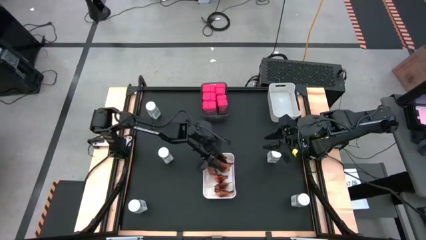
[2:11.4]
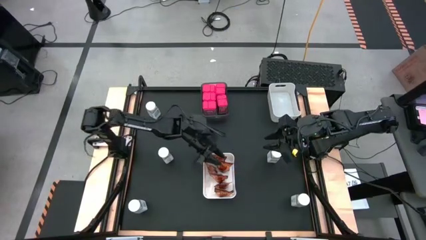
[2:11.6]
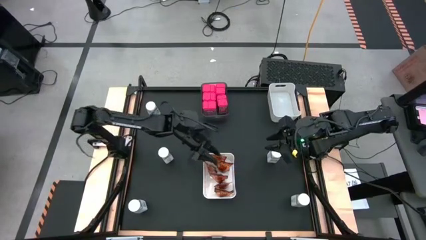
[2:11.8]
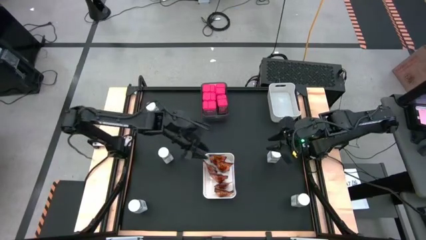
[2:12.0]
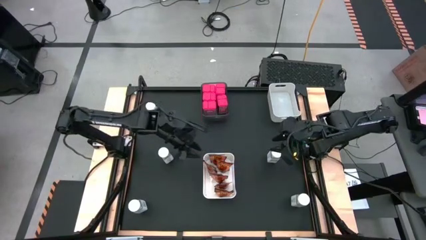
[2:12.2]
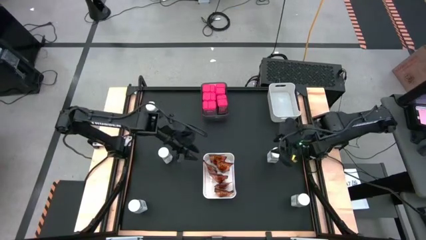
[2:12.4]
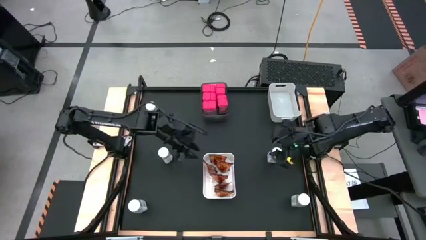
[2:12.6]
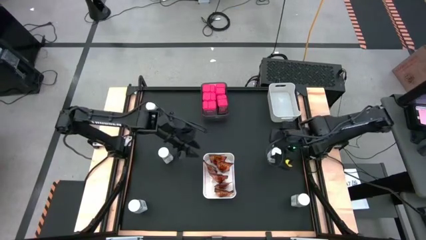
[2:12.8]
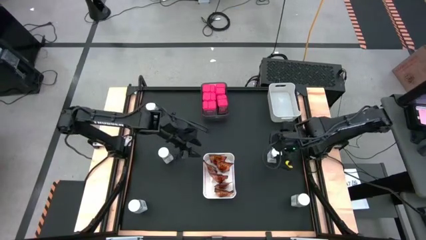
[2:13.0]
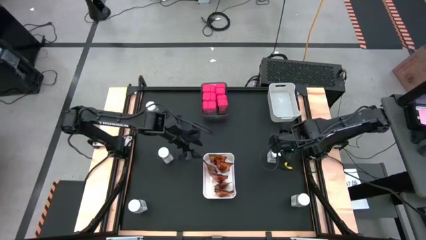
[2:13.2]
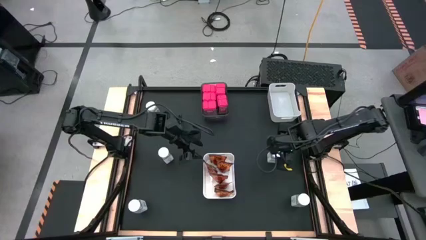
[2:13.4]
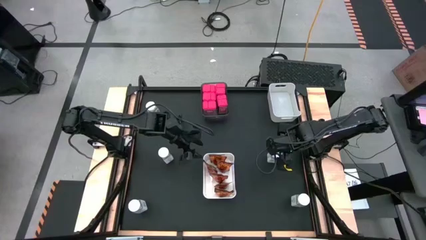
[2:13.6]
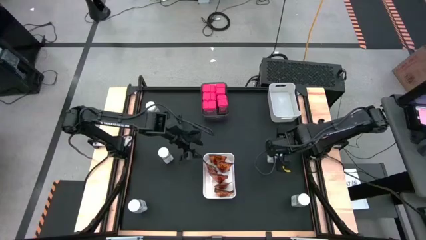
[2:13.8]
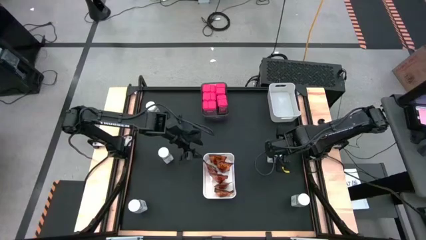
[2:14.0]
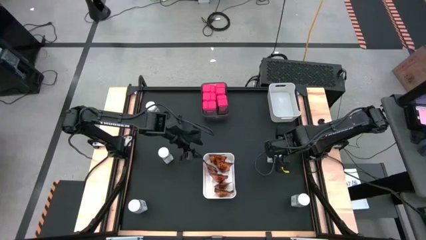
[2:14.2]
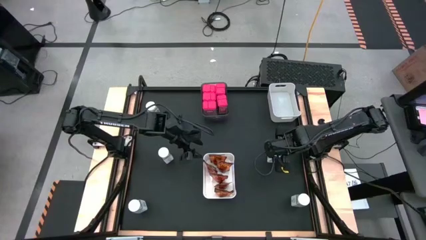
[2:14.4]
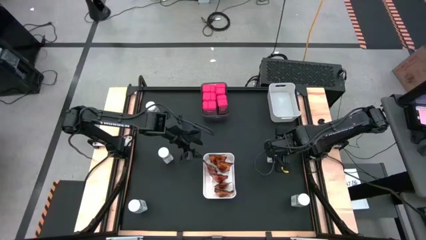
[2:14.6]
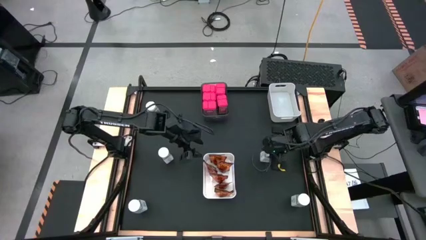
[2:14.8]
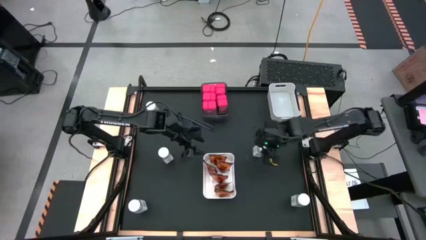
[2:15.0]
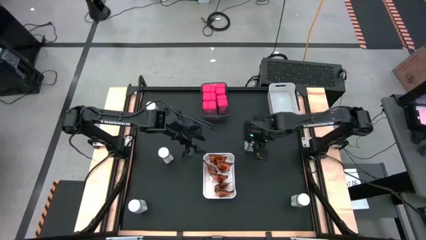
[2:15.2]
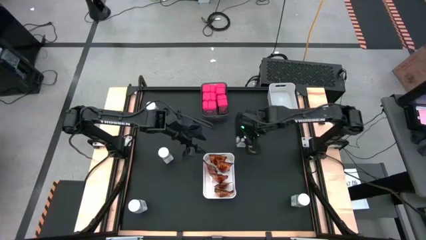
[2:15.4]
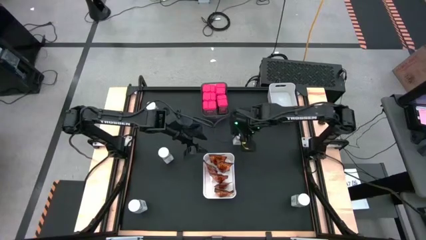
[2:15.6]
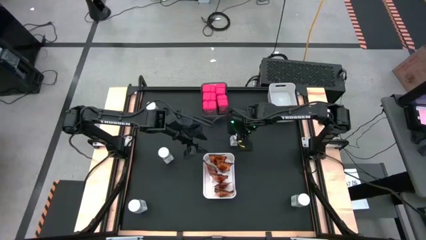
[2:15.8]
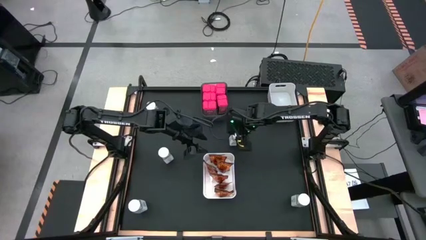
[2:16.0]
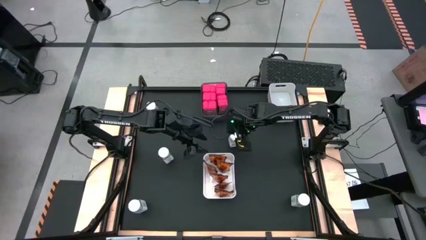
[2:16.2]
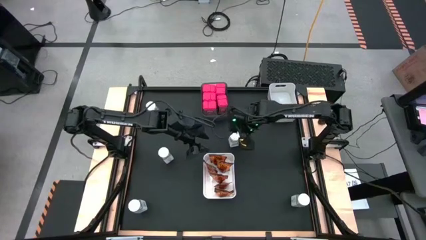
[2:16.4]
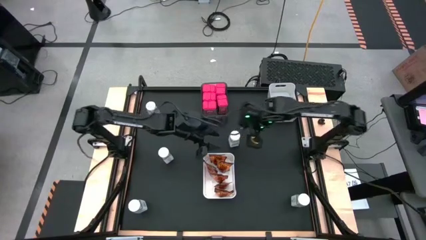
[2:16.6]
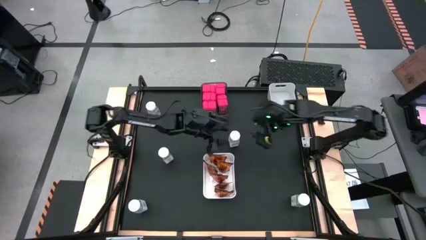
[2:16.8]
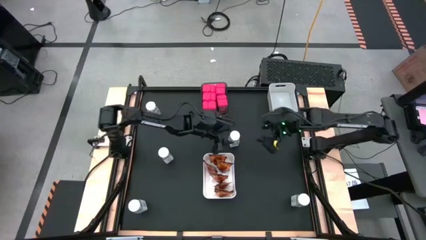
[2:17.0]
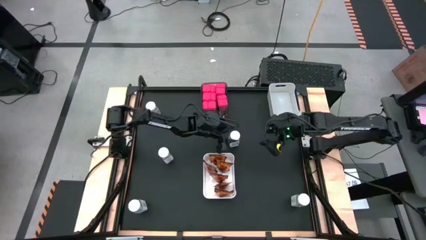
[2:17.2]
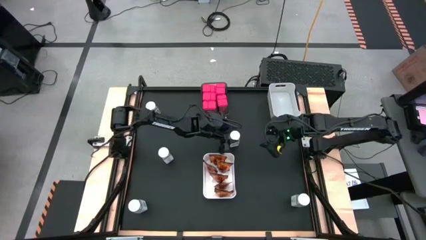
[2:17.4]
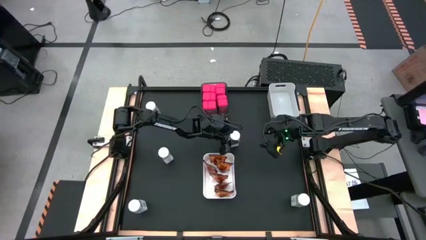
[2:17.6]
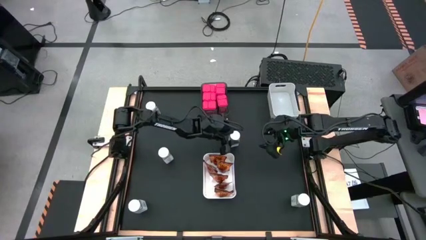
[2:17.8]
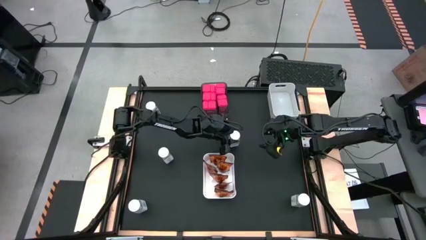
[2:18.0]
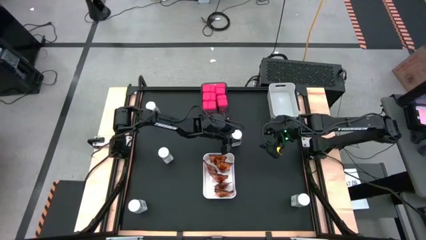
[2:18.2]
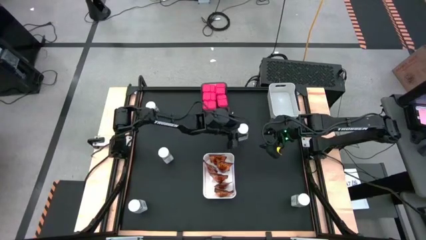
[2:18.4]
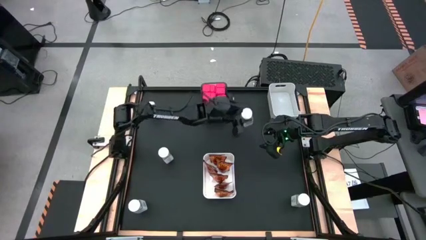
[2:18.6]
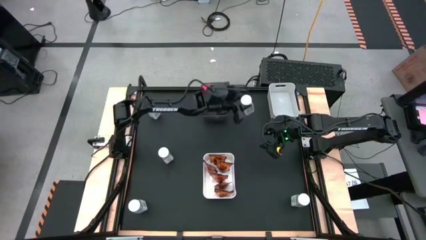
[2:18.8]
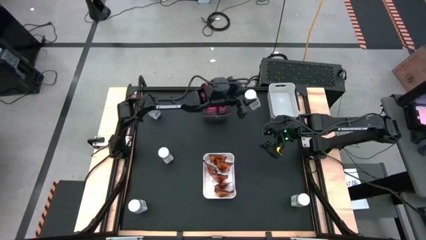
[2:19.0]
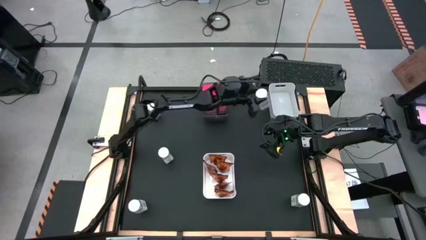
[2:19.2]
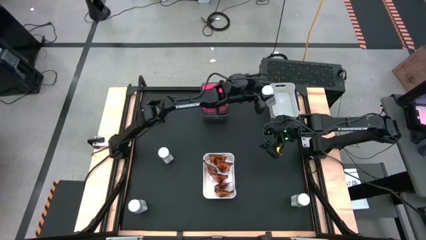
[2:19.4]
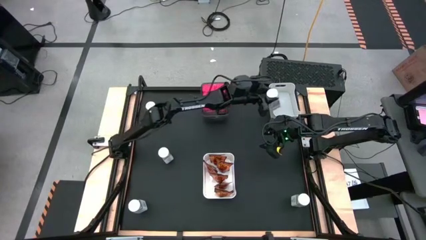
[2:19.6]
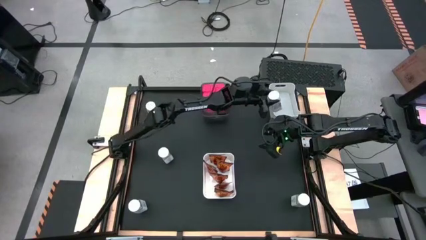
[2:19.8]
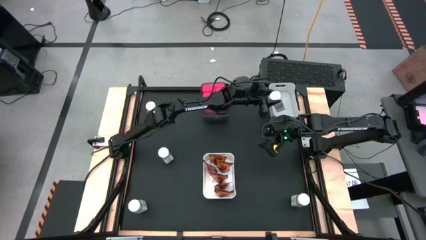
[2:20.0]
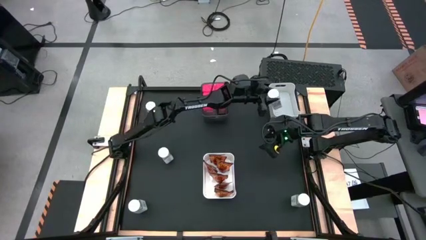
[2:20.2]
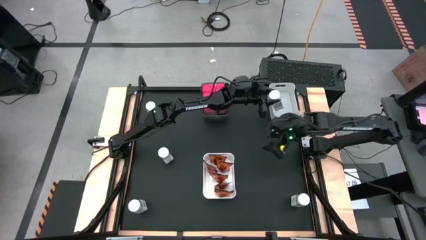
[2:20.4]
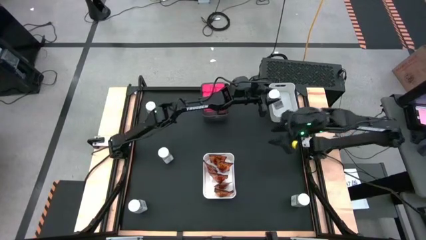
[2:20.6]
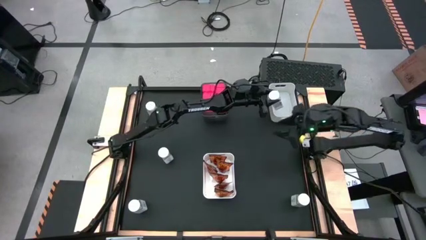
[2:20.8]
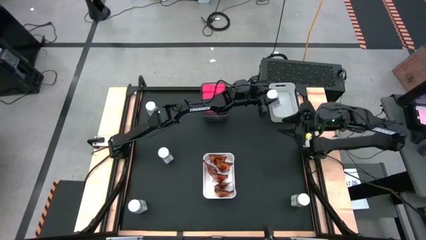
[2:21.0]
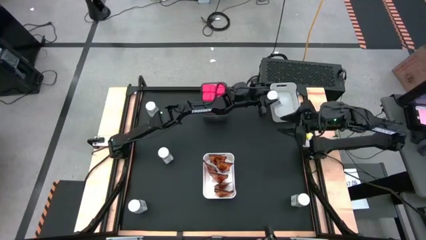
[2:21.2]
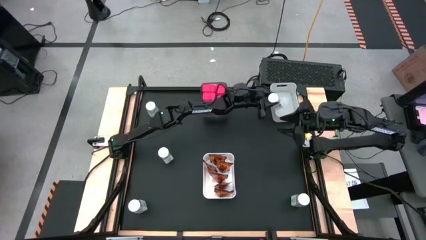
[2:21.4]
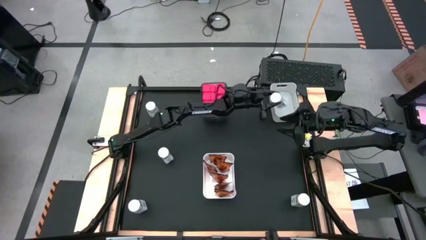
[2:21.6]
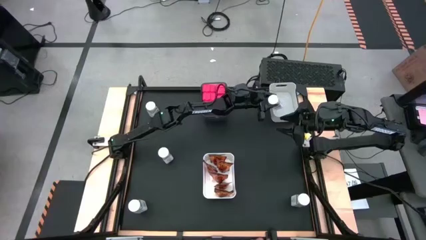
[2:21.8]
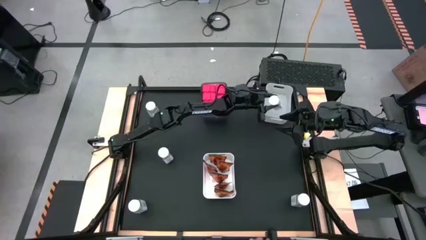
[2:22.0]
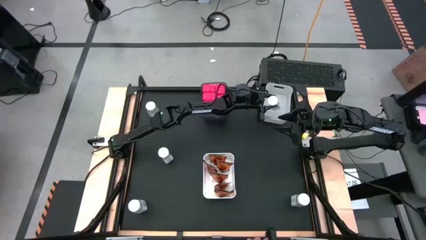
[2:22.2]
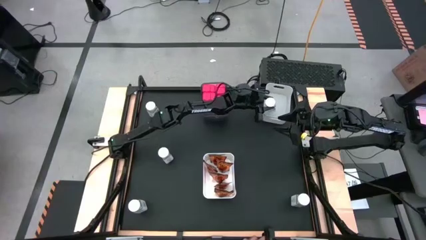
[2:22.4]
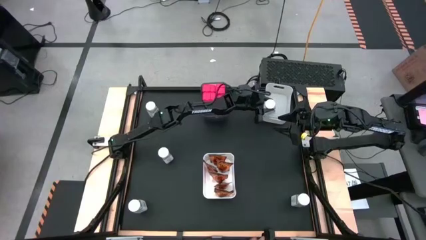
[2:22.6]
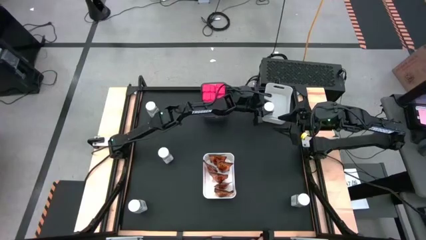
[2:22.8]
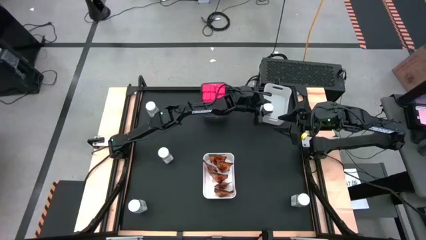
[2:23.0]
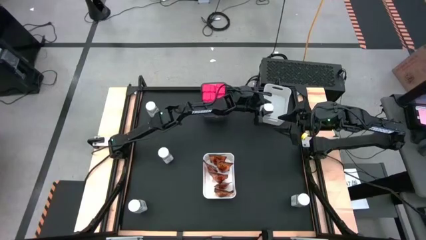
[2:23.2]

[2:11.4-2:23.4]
Task: Sort spices by type
Put the white seasoning bottle into the gray bin

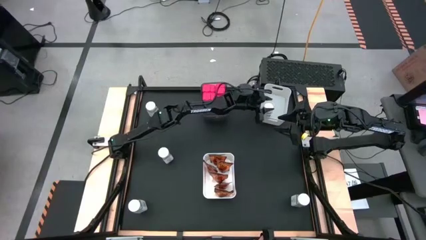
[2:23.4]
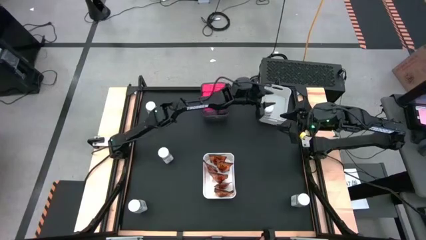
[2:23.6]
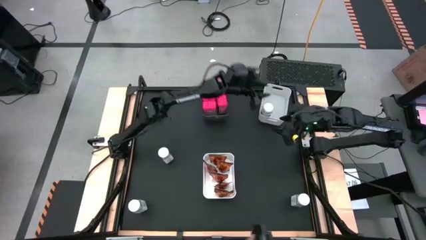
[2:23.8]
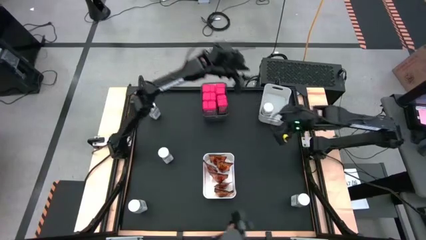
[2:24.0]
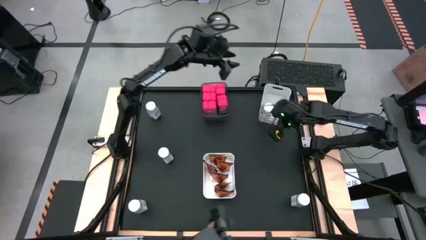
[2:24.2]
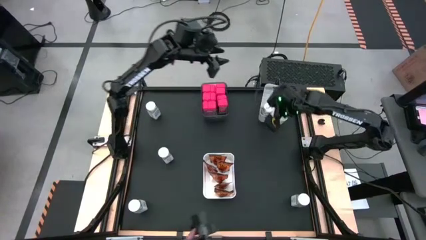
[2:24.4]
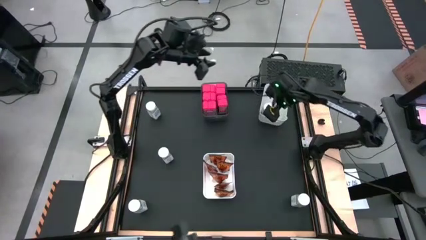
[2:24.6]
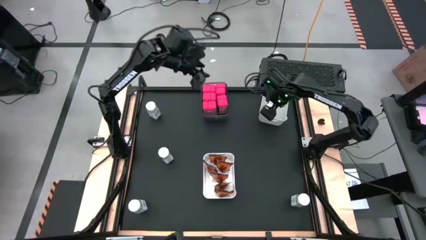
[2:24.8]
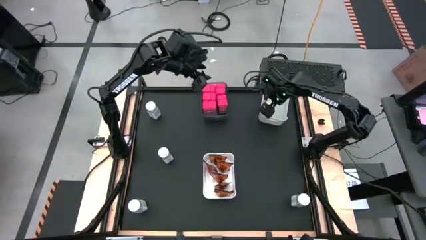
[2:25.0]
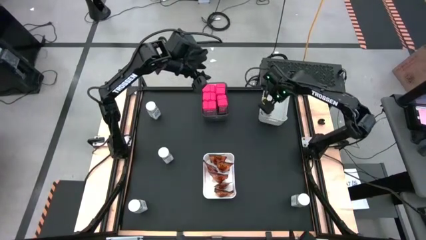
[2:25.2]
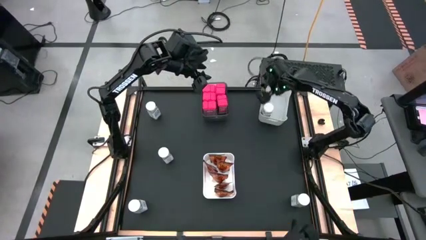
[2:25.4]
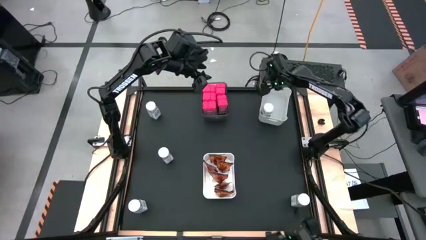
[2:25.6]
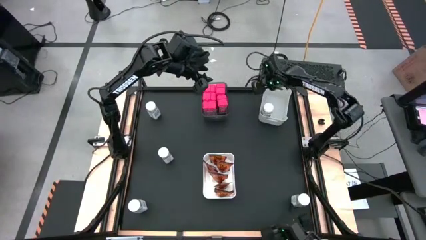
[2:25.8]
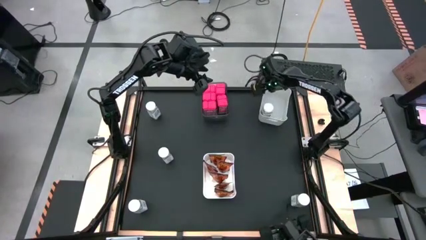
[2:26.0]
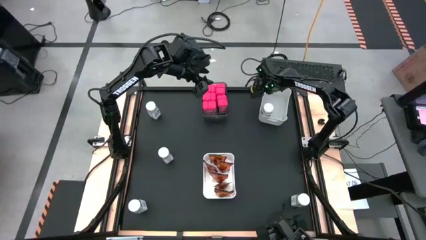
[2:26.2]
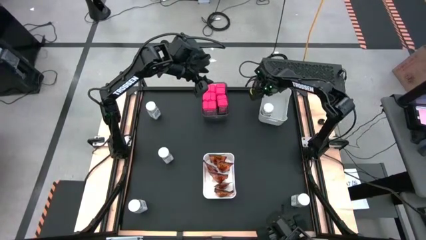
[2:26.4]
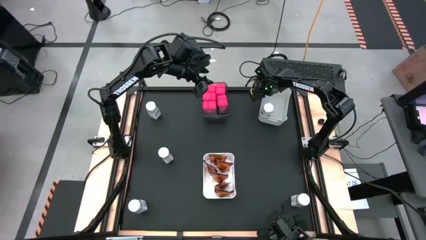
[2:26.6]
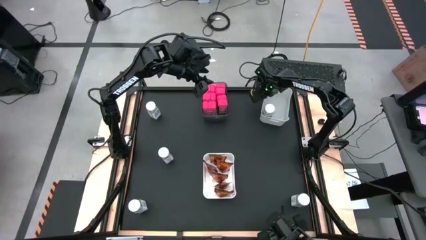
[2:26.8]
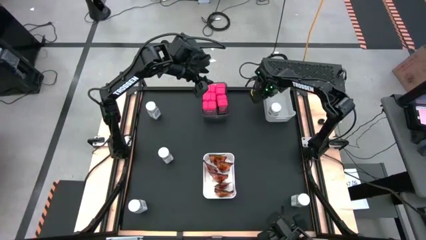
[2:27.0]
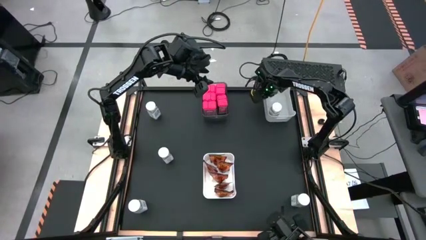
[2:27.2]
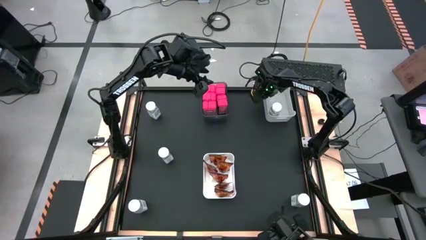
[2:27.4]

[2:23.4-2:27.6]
Adjust the gray bin

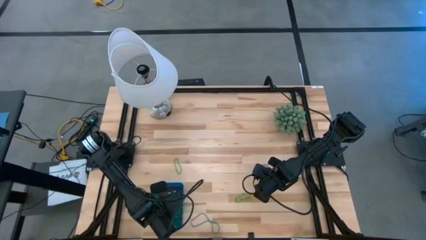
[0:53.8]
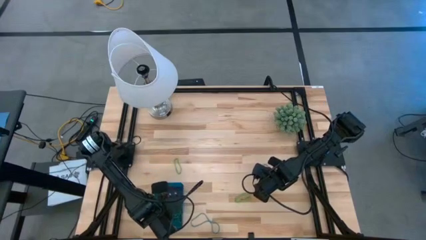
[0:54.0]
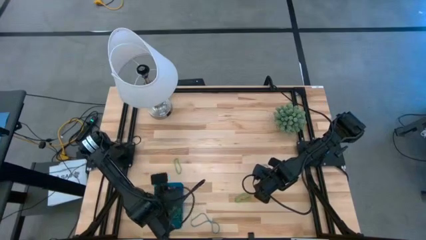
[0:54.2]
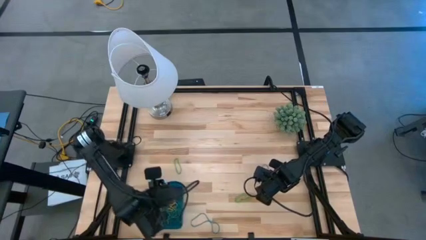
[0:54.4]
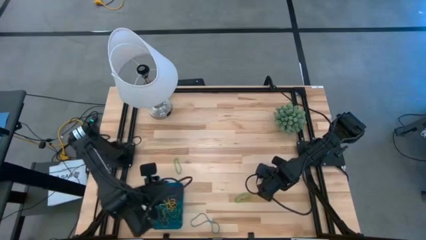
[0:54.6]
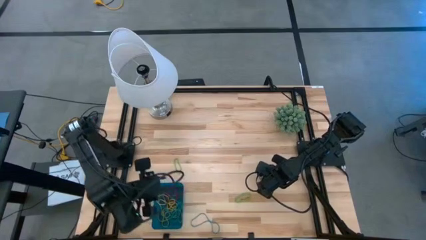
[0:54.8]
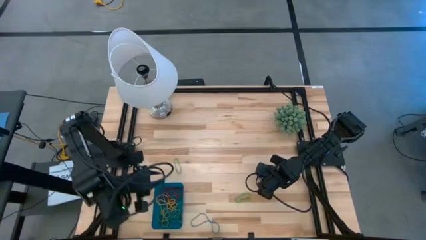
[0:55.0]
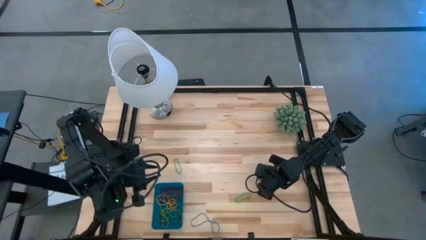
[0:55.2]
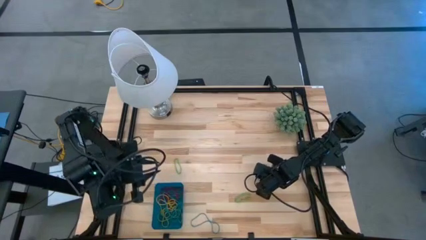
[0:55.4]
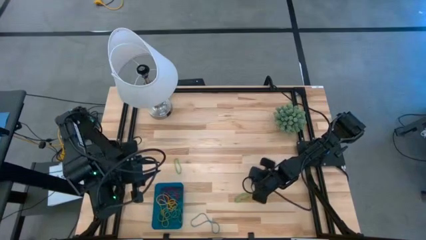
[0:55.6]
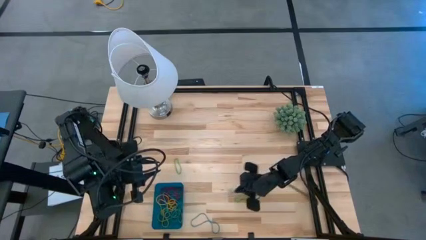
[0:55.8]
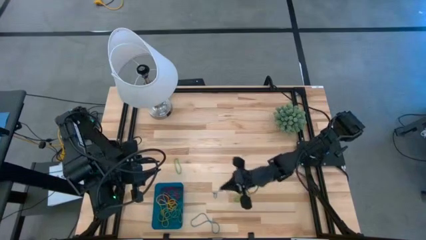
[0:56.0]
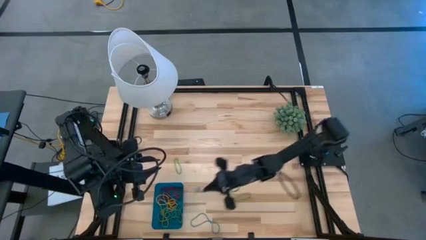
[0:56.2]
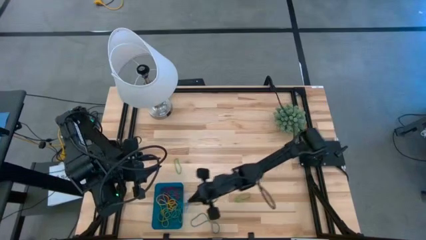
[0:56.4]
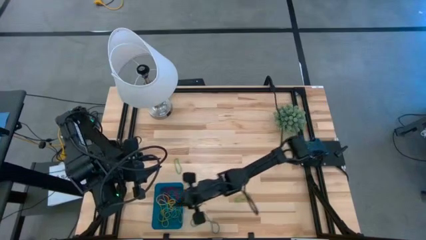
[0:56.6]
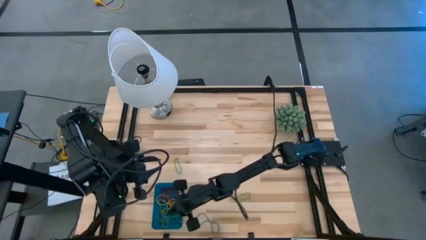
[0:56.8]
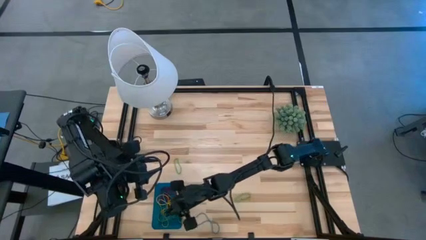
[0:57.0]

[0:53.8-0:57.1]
Task: Pick and place items into bin
Put the top blue rubber band into the blue bin
